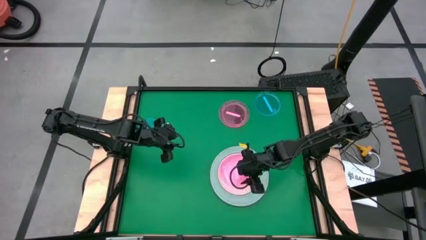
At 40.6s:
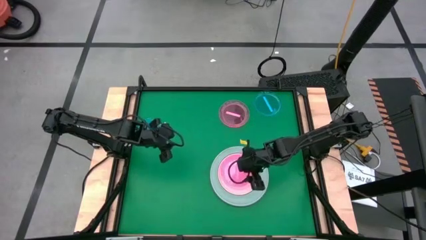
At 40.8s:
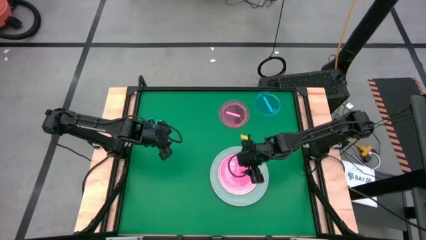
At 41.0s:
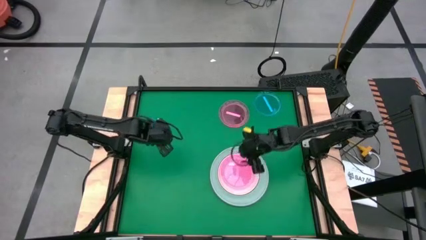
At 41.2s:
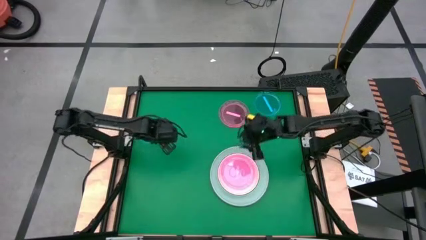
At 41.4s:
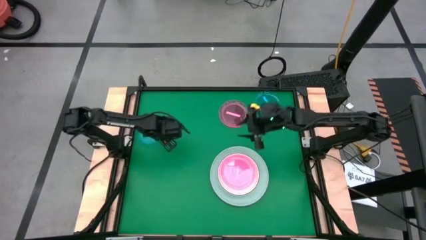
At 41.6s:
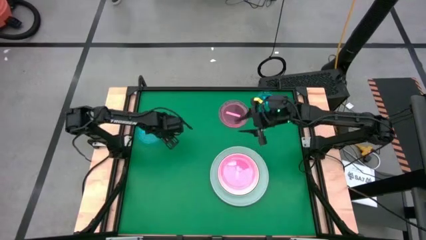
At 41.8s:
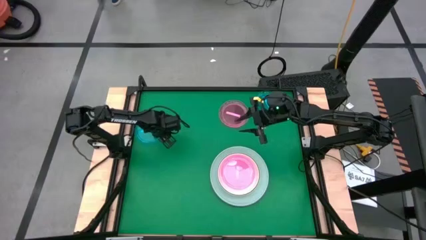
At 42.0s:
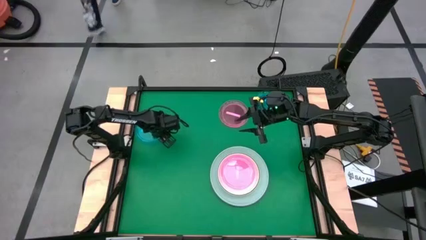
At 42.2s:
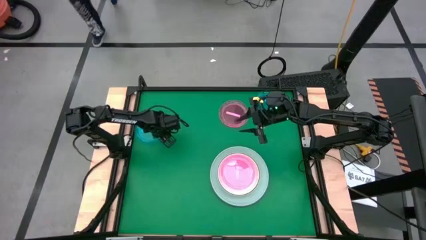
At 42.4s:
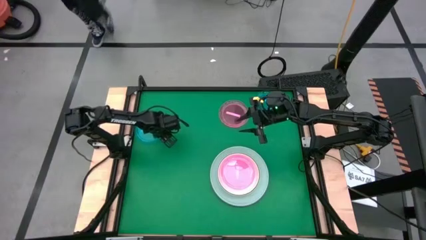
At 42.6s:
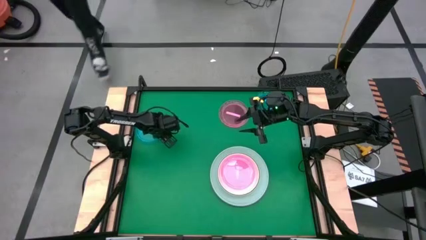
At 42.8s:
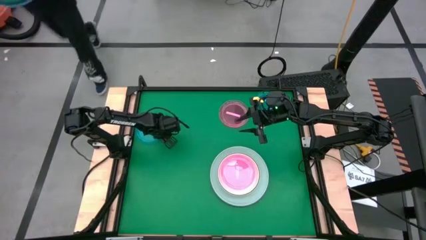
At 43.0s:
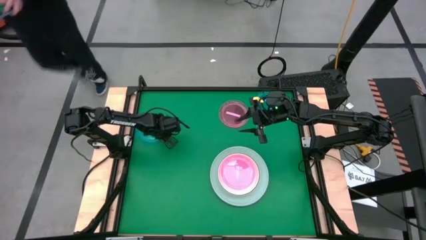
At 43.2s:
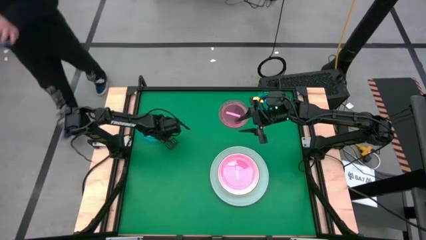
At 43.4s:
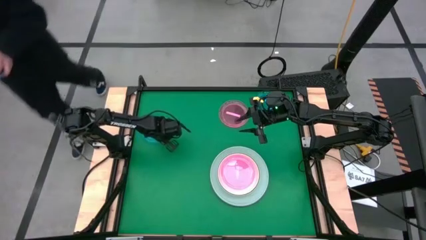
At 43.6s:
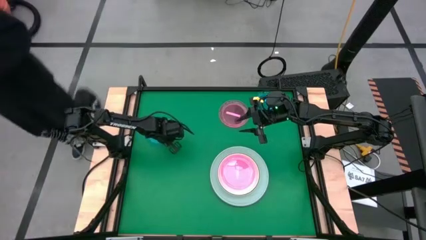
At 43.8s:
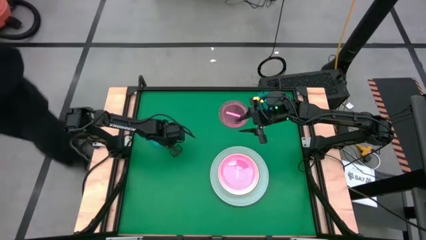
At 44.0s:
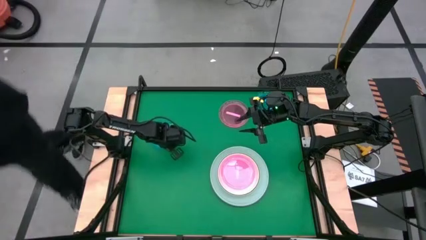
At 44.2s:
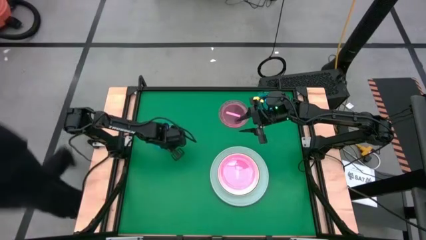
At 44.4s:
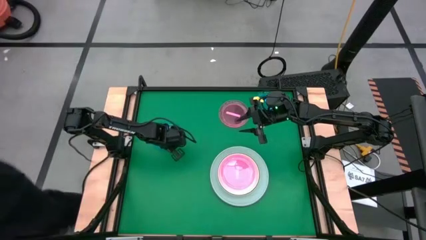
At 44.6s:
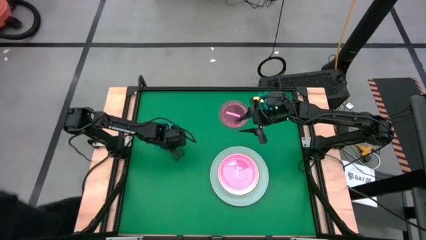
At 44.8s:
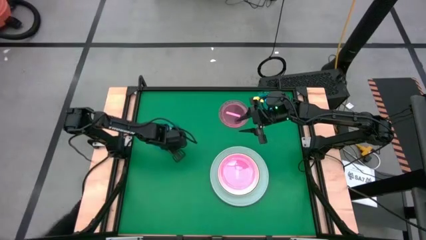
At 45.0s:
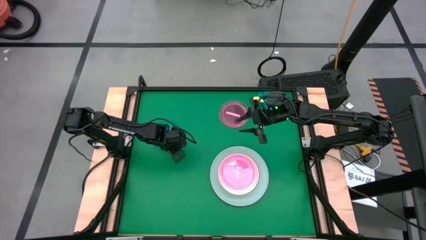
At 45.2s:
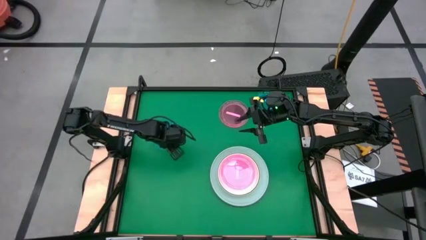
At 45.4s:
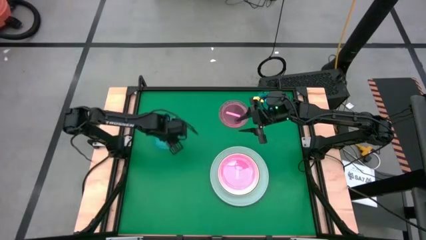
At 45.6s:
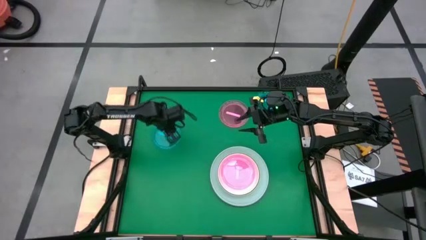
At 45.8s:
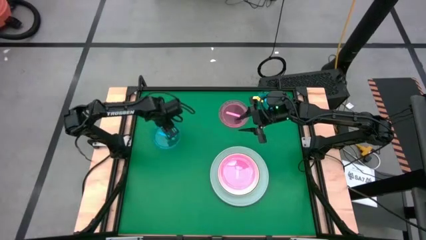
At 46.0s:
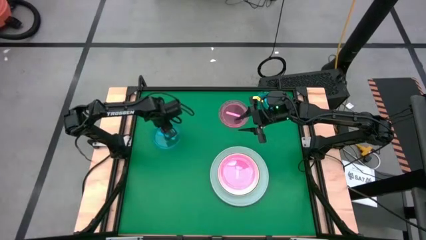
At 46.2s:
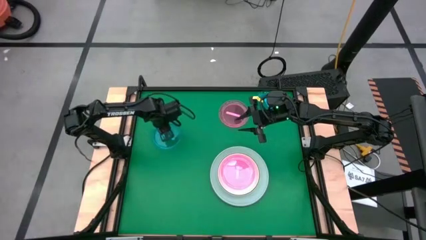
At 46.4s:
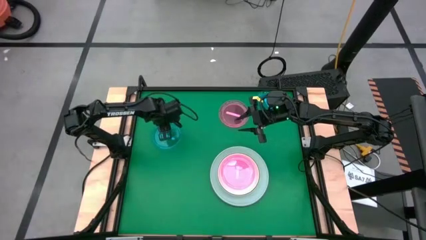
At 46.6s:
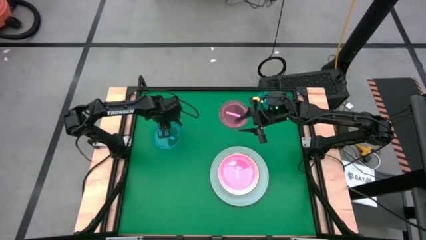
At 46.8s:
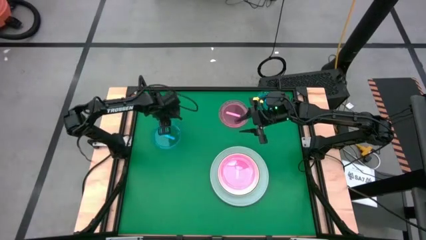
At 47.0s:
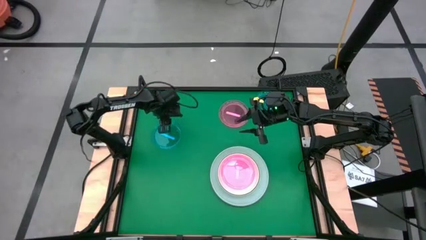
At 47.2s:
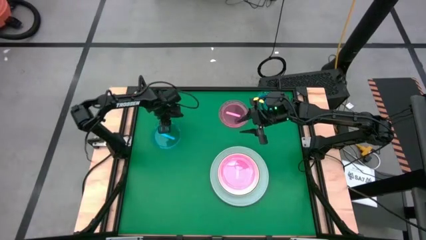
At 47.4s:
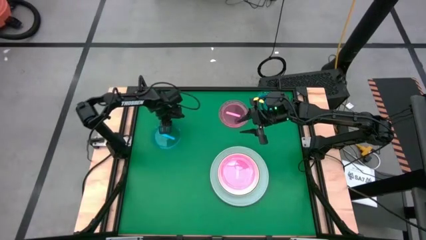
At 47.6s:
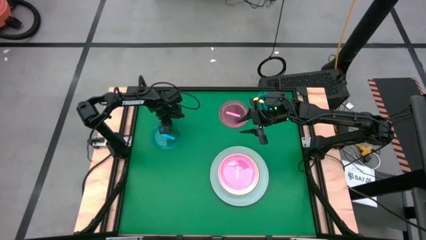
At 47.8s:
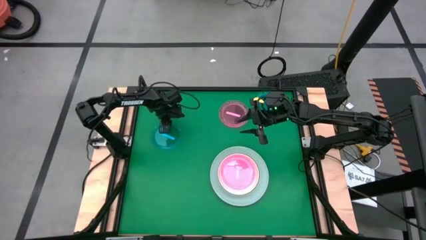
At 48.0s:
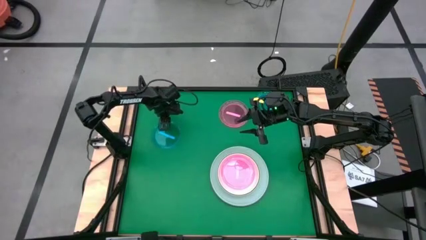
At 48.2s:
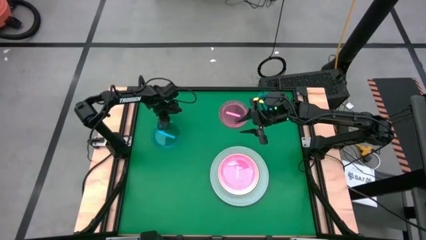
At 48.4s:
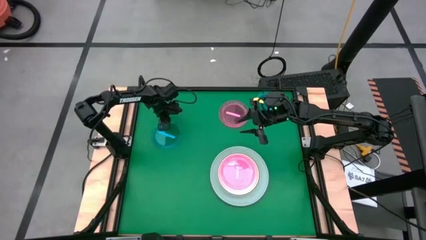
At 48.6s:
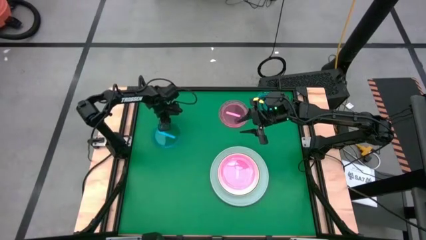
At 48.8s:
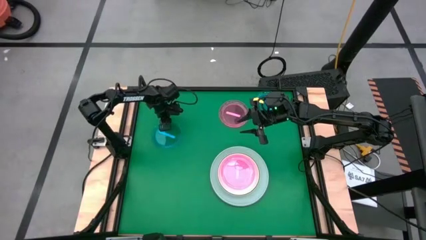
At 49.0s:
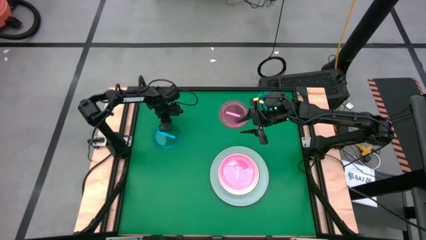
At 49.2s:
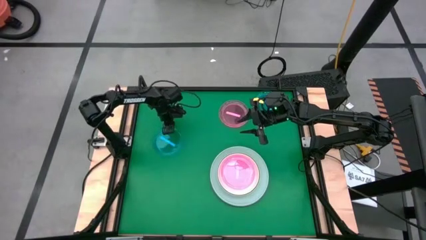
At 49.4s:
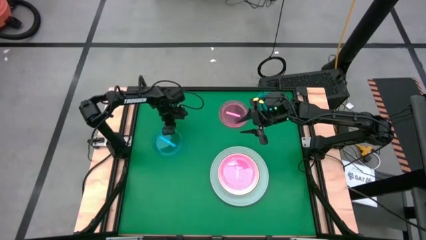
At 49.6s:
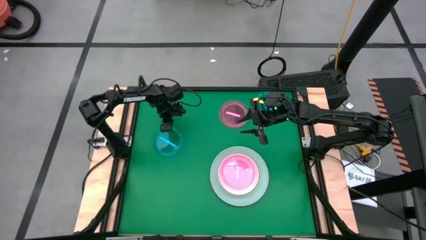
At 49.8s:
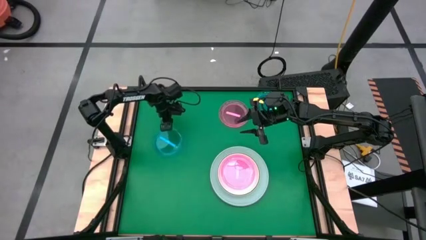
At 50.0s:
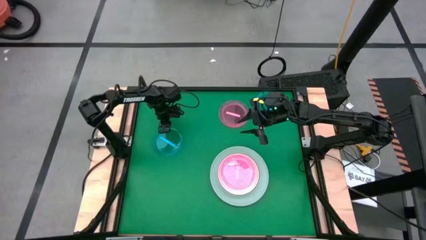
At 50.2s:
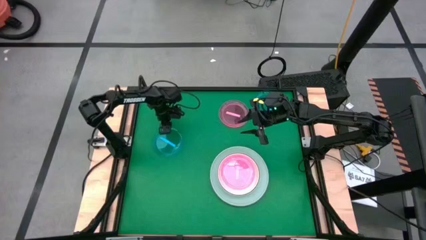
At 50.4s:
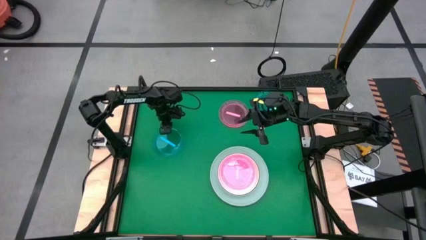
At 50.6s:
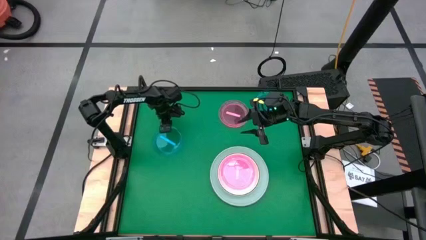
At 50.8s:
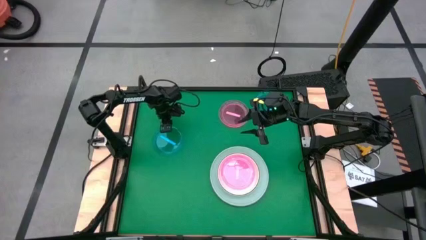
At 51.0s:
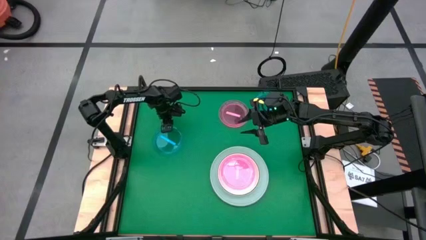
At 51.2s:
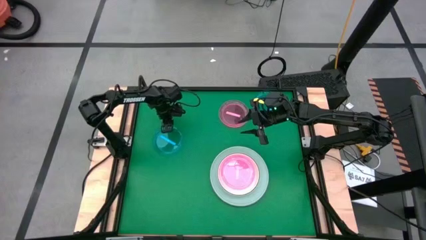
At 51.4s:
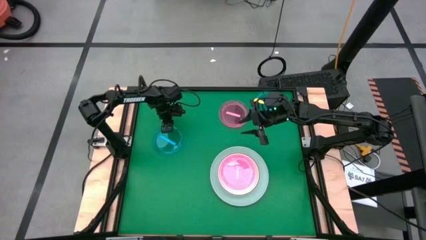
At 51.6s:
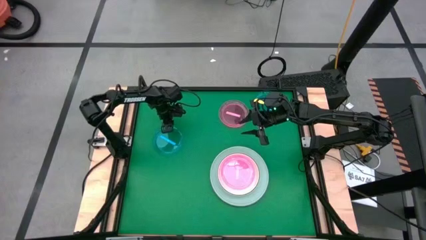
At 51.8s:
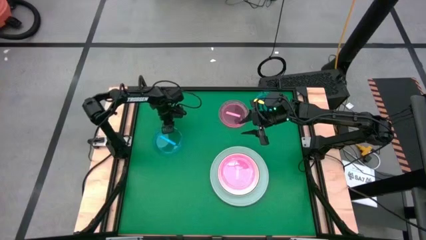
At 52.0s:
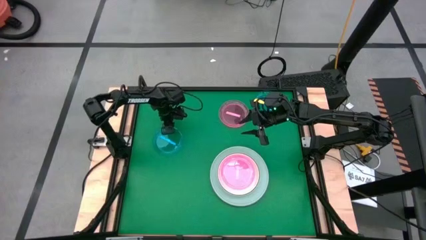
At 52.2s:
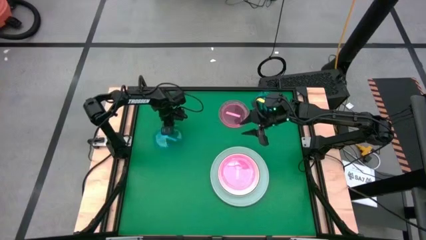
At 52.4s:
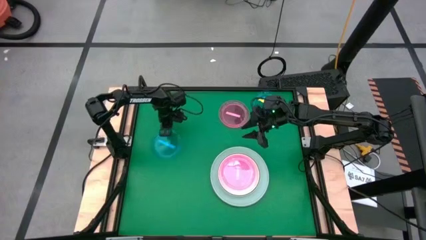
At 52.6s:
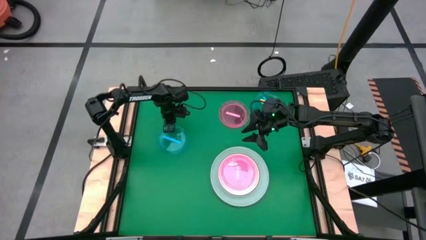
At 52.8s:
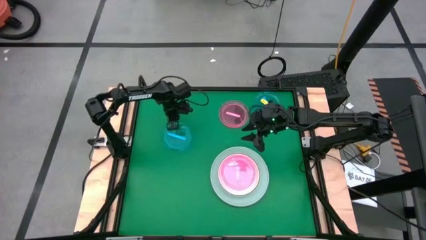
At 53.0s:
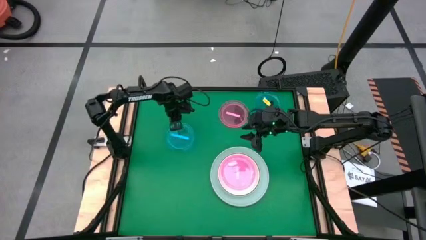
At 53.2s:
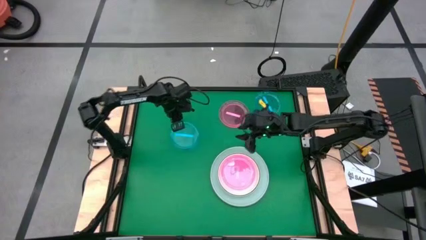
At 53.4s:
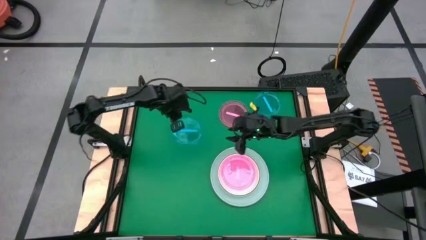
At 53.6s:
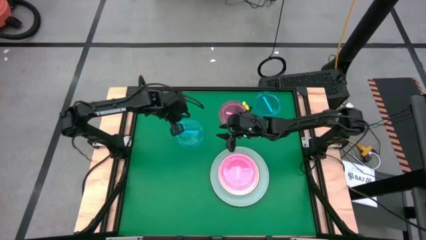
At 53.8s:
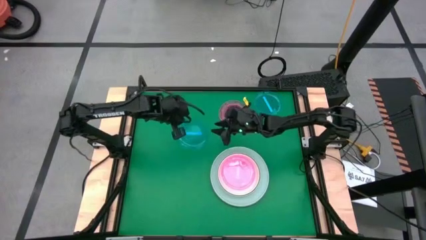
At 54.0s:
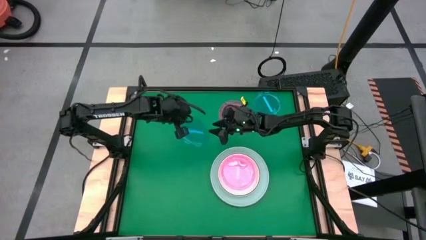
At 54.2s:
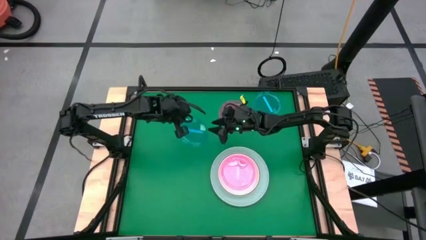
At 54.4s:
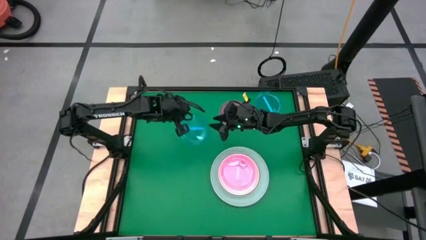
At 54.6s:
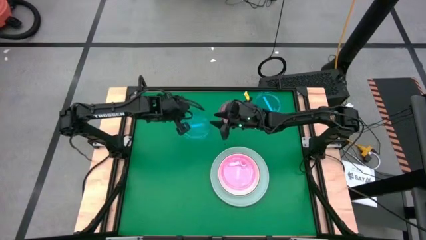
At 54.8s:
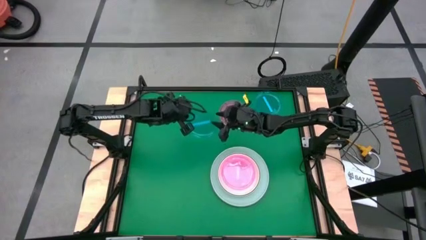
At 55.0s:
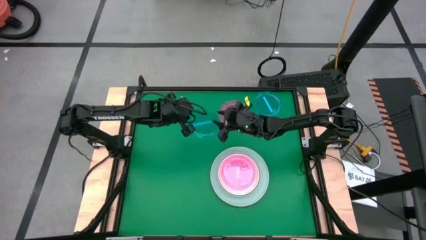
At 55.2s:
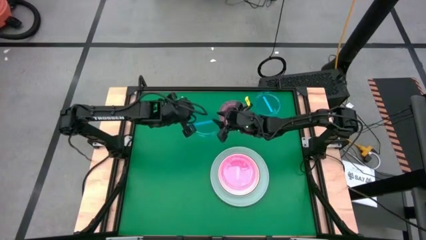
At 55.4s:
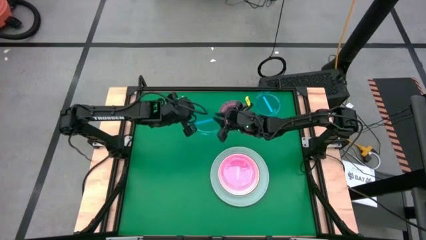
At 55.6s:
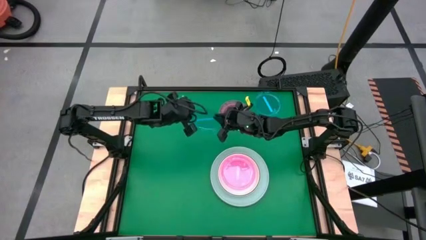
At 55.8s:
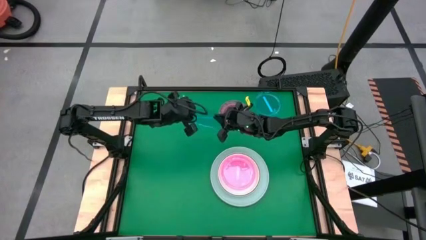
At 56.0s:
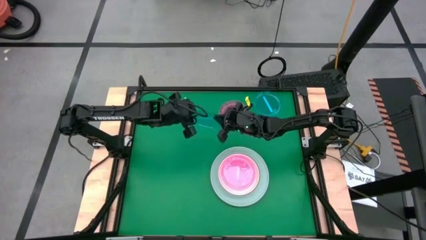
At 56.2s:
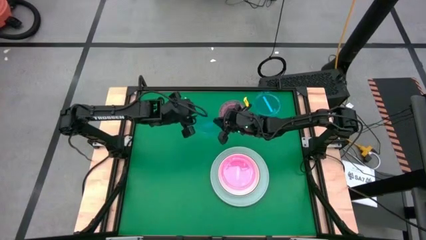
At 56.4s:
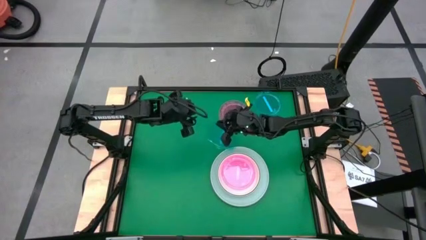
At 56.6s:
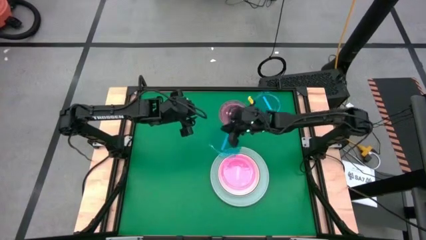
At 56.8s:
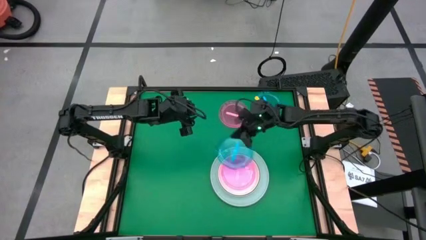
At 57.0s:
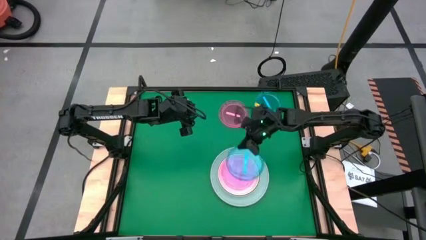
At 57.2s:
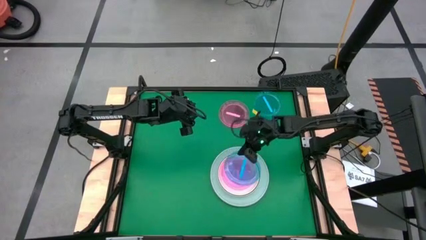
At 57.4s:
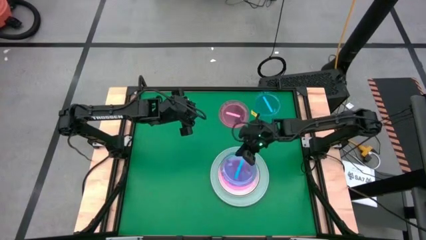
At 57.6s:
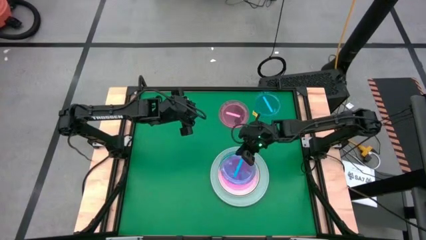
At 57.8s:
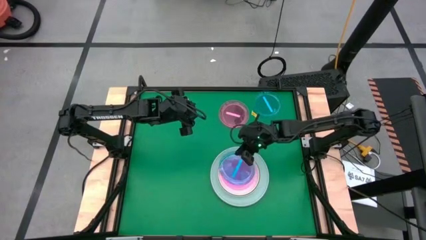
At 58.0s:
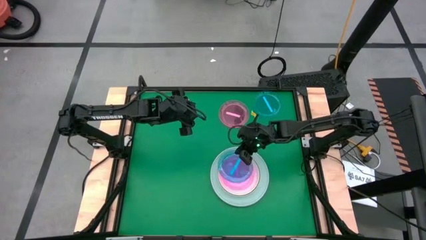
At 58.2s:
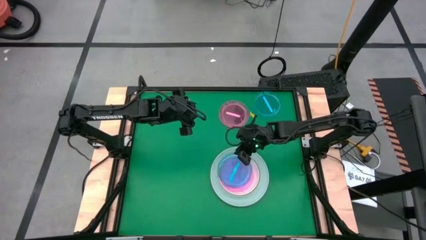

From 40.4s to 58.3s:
Task: Stack plastic plates
Stack the left blue plate on top of the pink plate
